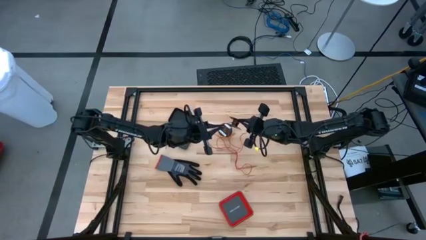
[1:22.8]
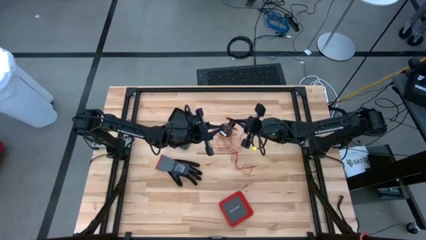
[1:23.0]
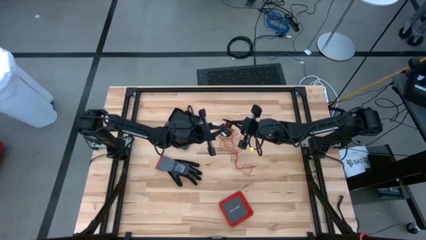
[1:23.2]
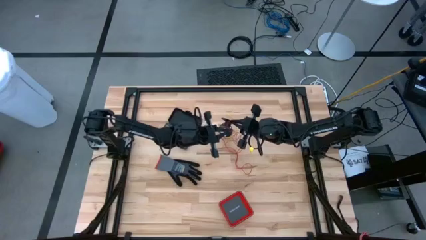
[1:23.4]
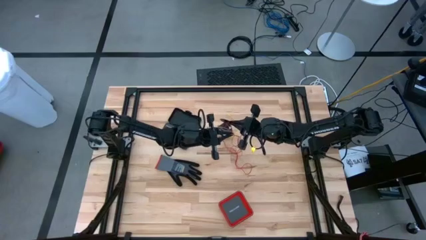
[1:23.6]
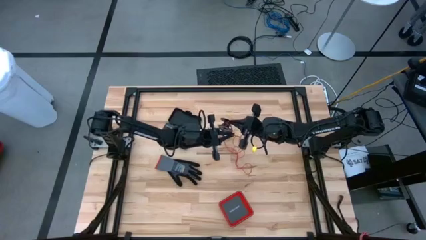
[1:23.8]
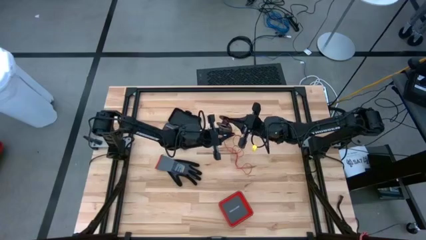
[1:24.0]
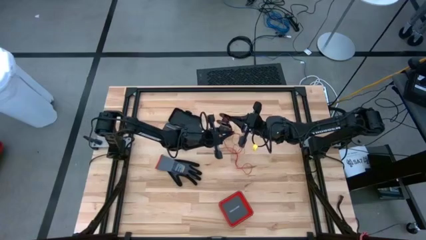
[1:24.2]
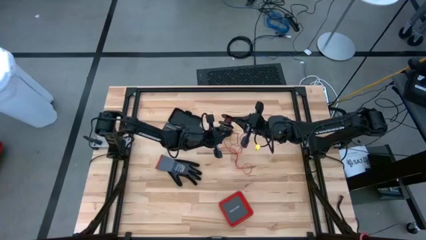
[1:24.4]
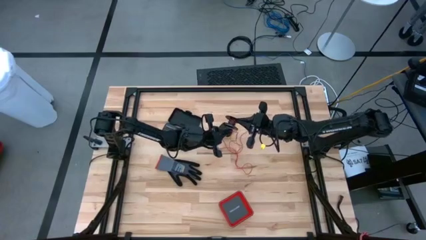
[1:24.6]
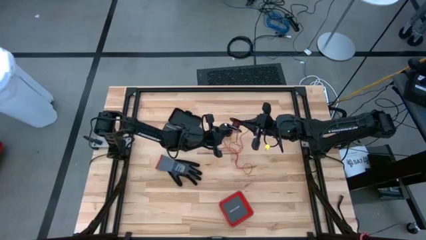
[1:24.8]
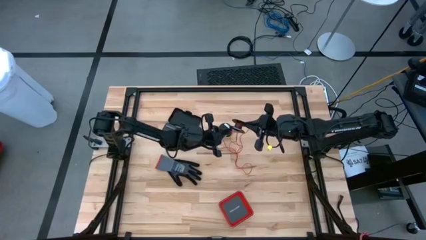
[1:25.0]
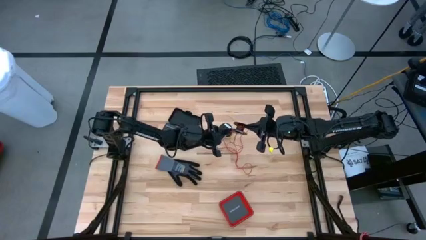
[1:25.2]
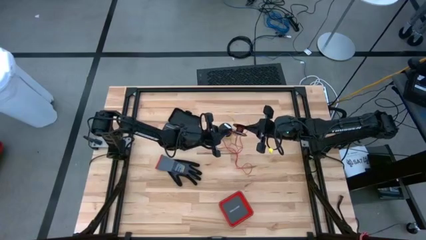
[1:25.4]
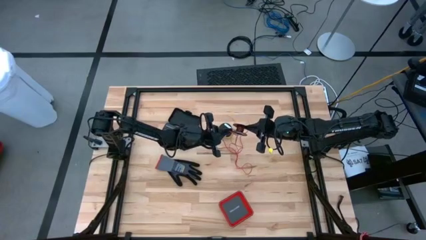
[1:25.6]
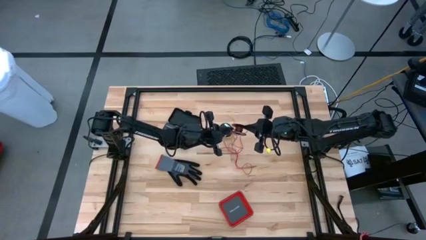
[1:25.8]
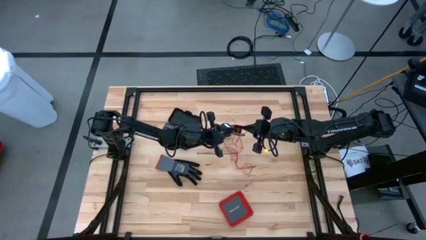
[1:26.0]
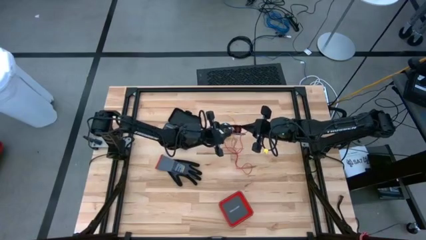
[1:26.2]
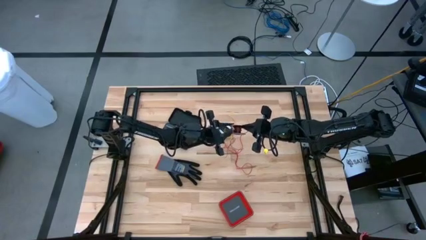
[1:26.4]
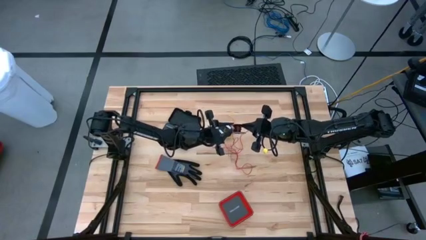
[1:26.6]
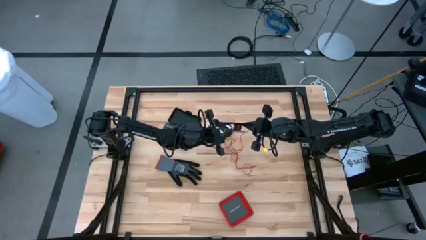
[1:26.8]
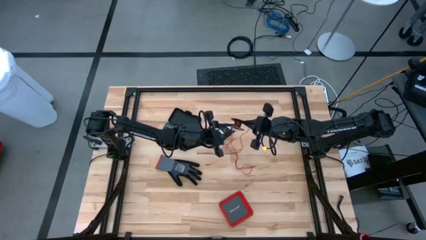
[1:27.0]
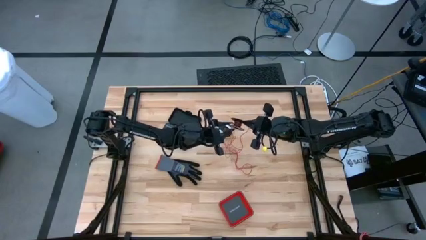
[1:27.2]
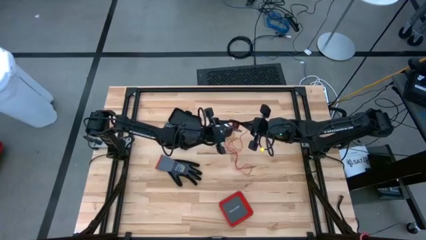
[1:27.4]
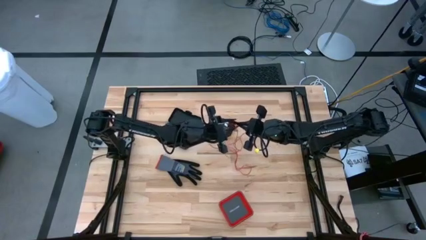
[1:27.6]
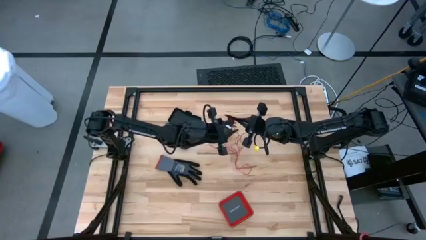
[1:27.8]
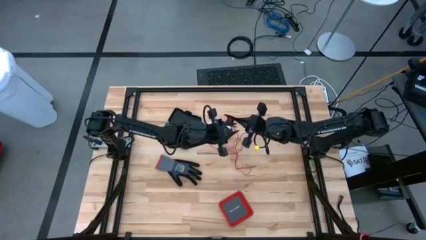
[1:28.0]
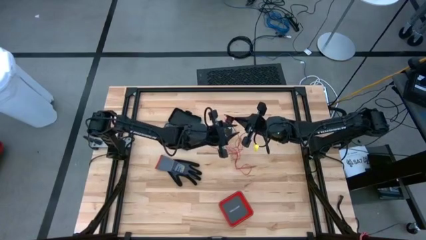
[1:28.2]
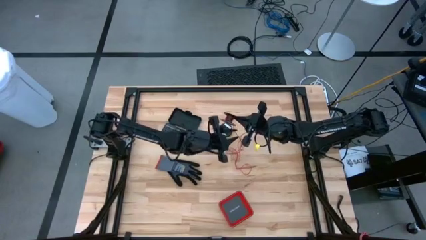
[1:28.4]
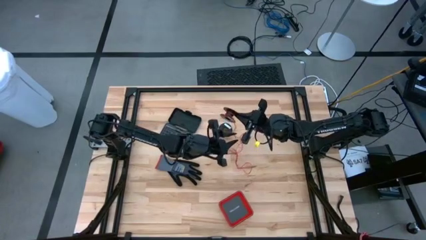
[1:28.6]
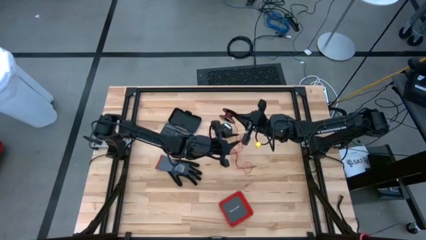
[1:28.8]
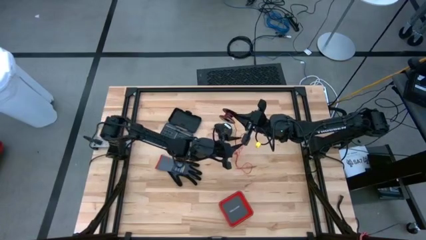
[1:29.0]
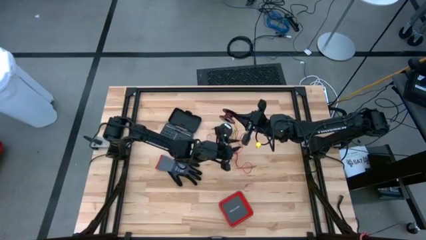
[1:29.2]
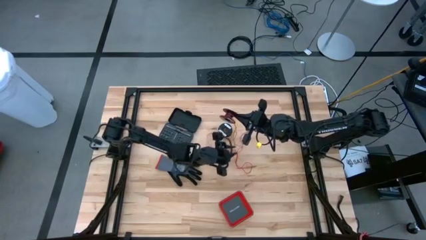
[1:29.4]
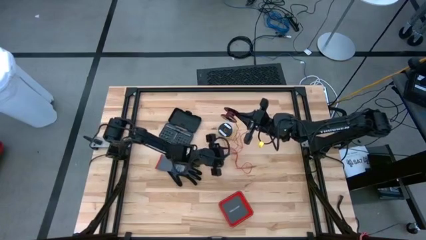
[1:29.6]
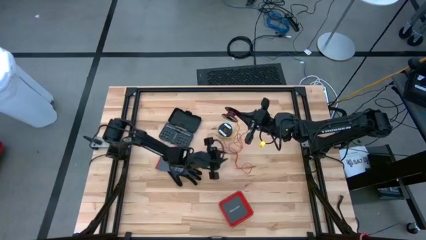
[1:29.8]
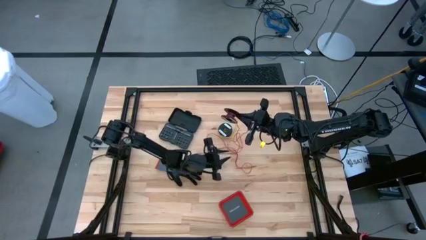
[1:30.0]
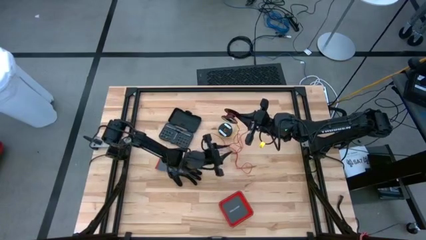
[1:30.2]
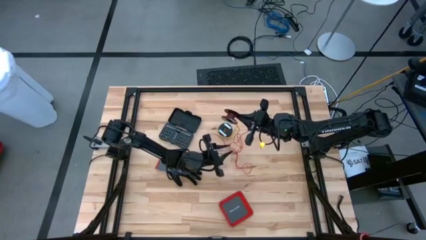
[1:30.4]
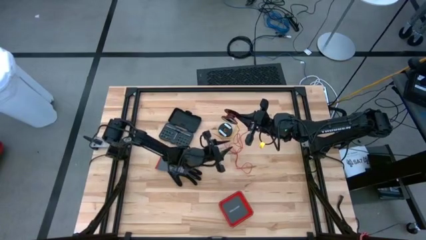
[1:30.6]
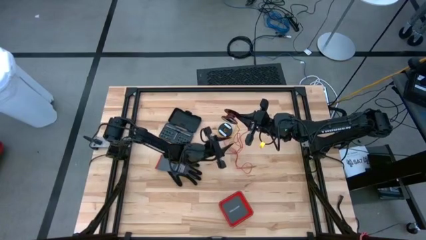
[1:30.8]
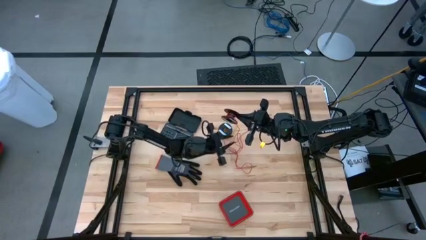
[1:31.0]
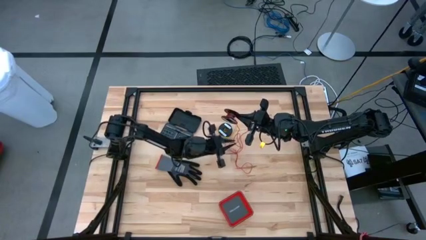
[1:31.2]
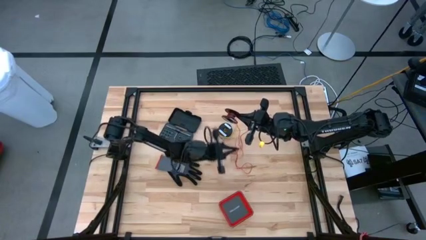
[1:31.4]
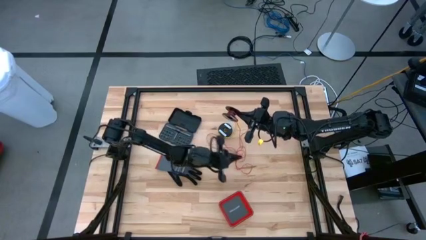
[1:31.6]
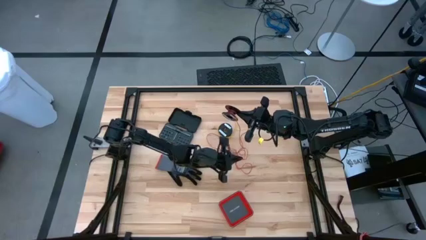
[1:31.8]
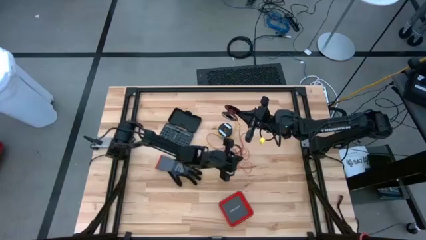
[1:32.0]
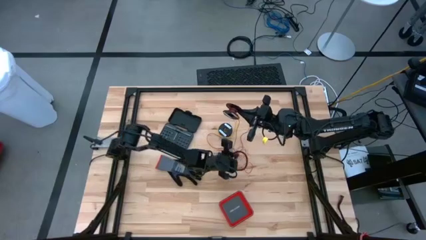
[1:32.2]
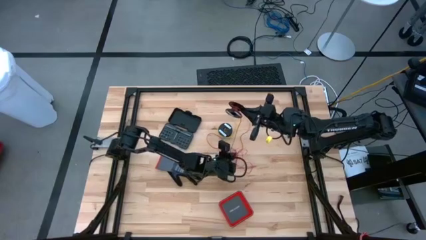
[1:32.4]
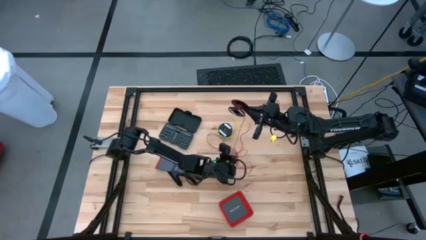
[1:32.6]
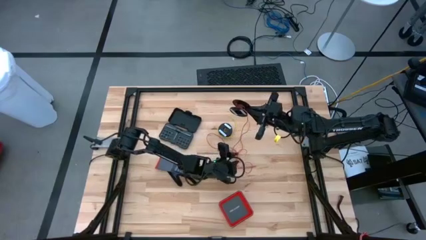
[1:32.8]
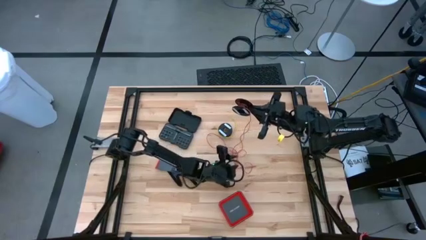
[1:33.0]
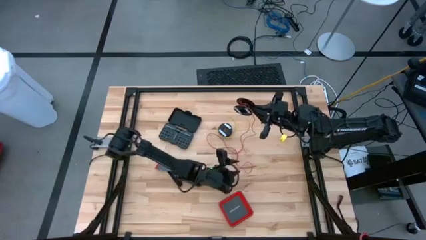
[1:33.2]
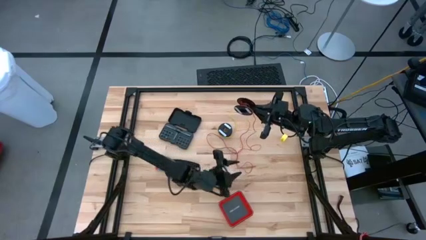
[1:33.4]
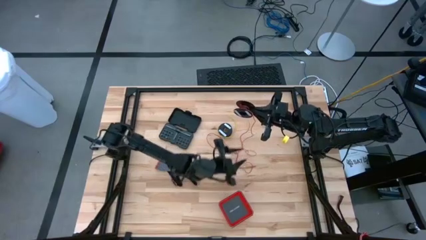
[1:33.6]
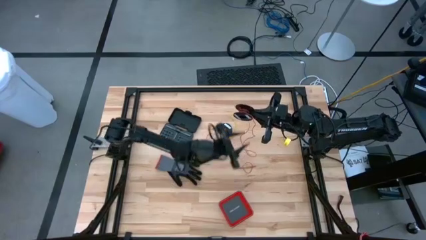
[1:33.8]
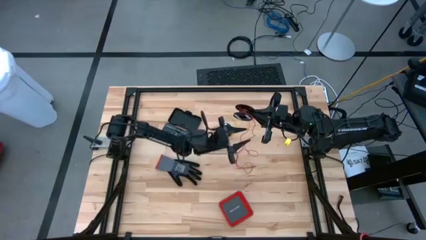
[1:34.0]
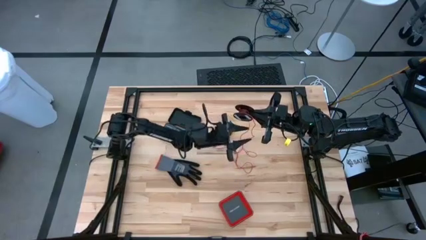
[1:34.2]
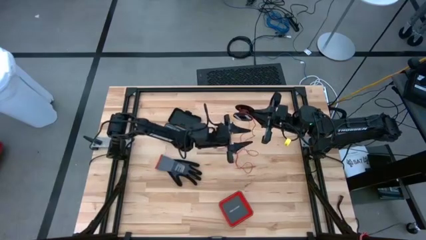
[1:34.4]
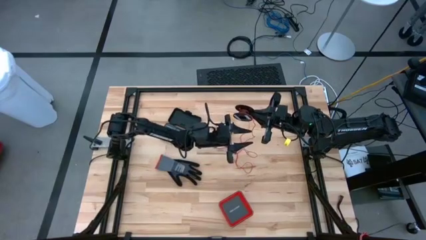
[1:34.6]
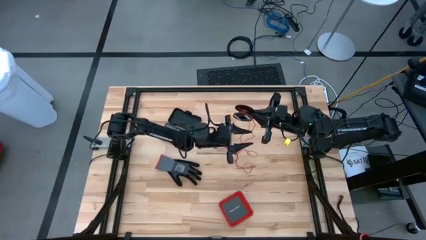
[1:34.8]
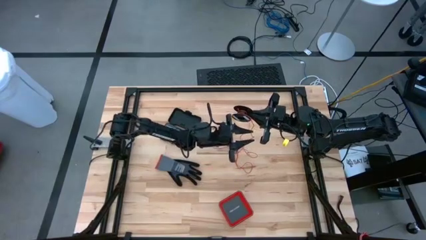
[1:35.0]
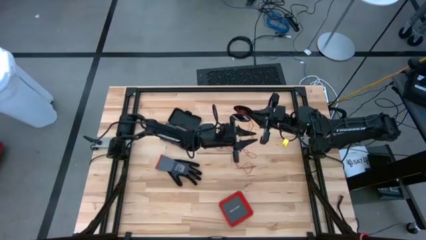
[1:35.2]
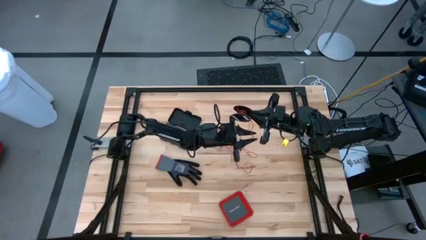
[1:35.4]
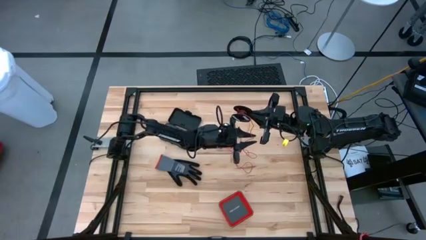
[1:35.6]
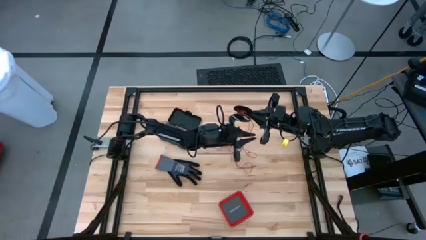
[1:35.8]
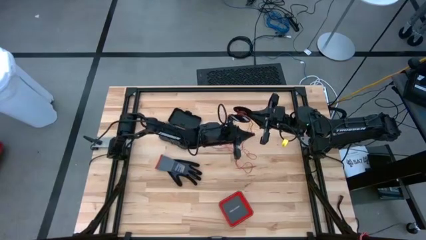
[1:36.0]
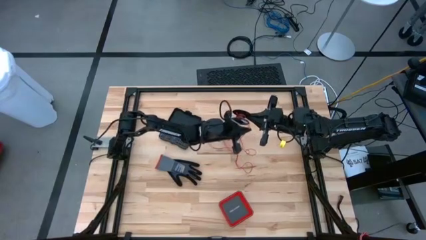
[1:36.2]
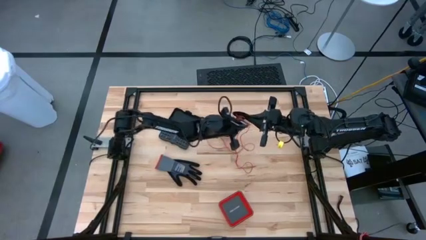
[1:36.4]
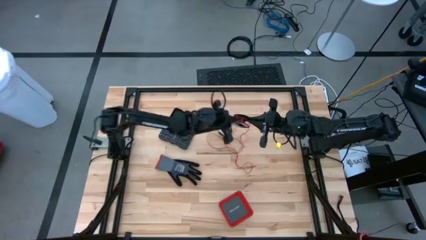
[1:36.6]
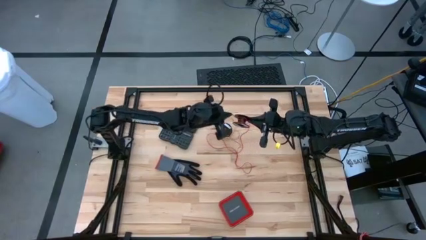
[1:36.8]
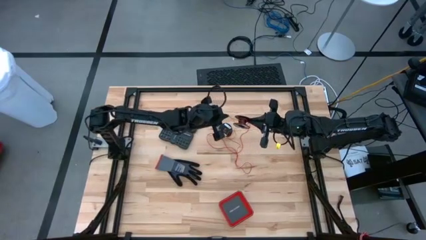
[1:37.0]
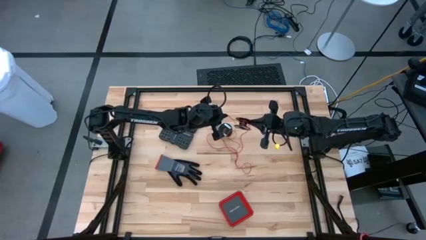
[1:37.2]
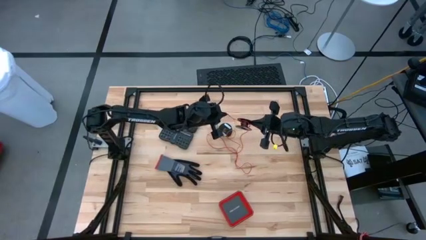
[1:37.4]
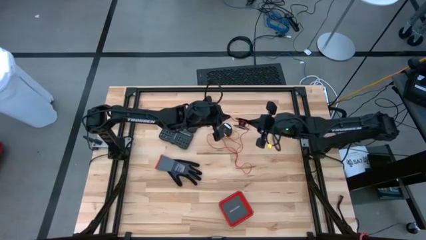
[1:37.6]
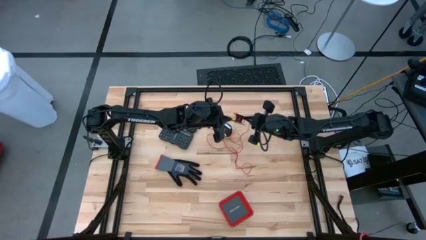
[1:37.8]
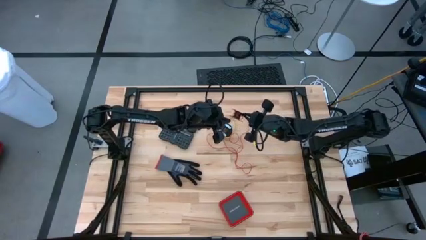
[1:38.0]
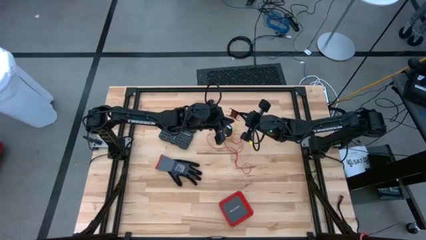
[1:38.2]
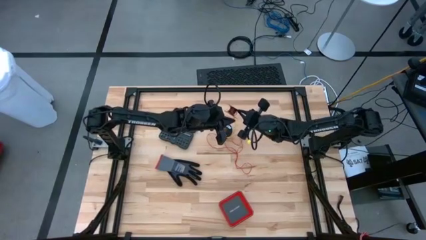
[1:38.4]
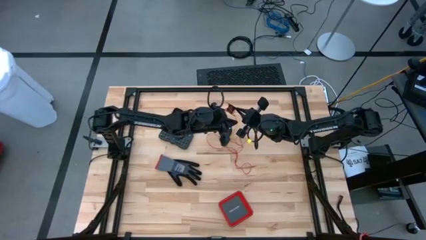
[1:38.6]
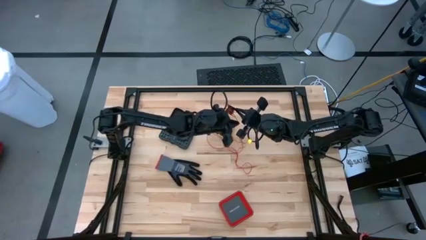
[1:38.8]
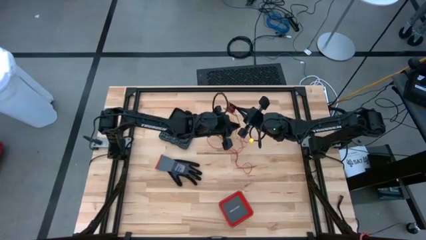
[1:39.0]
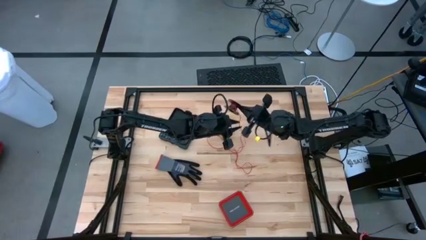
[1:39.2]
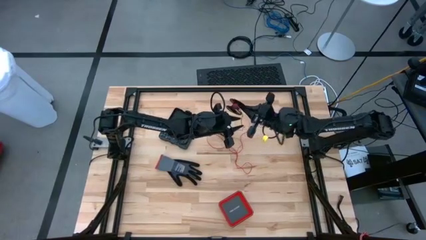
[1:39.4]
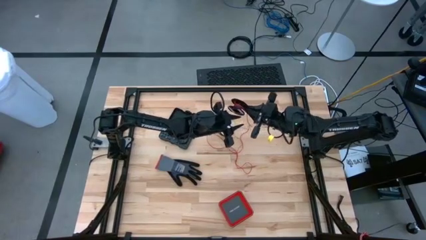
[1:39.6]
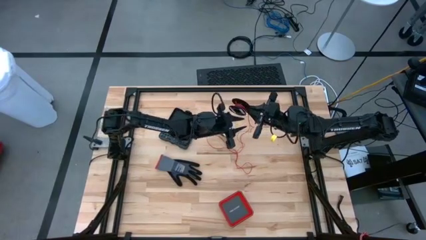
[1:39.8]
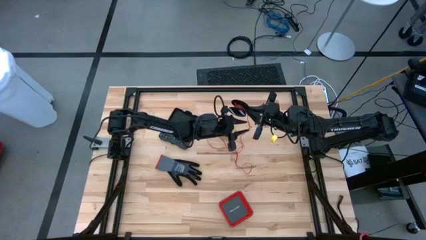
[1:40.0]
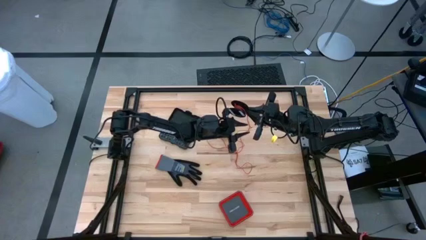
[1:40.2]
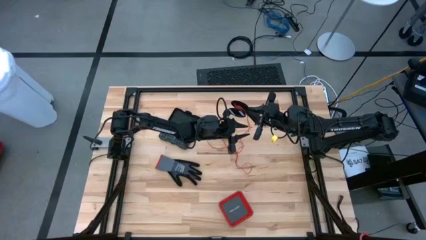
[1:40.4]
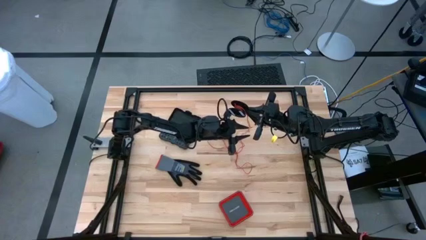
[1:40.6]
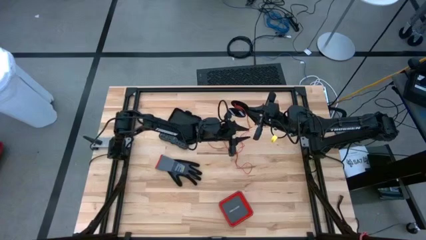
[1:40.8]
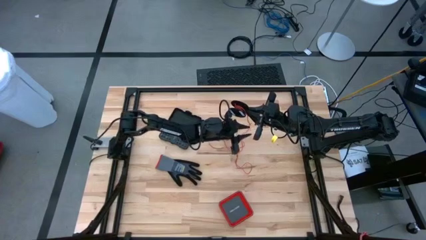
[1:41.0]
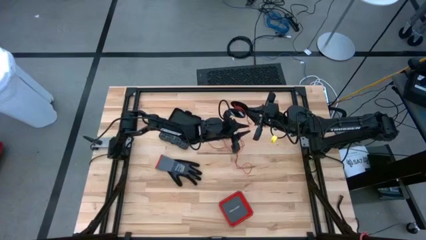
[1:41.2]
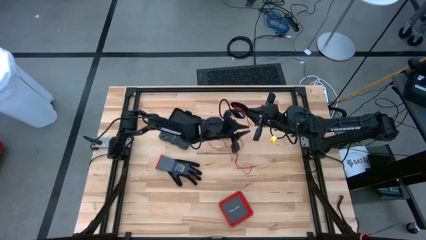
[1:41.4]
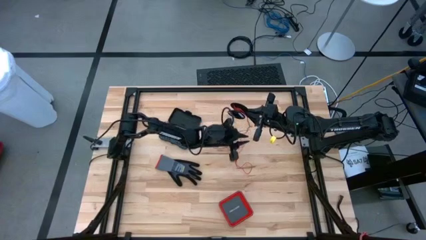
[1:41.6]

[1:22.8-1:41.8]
Task: Coil cords
Coil the red wire onto the spool
